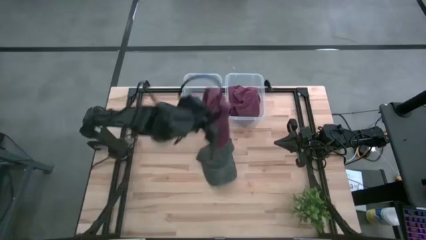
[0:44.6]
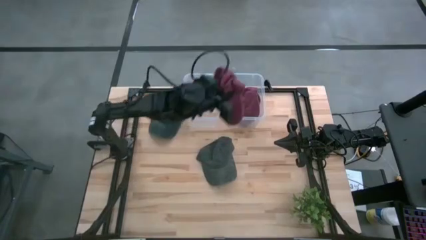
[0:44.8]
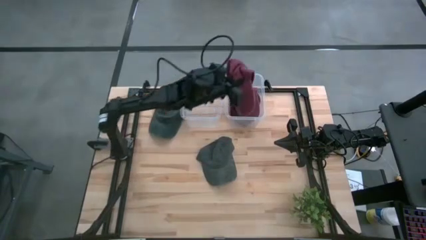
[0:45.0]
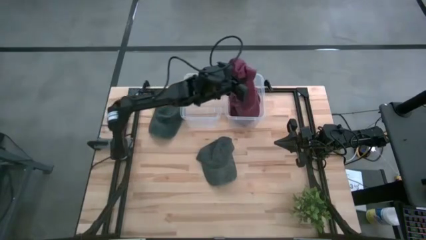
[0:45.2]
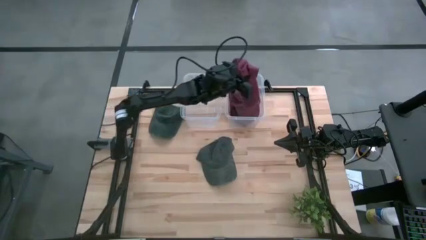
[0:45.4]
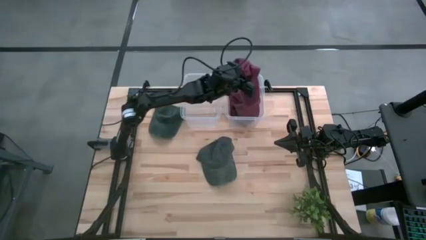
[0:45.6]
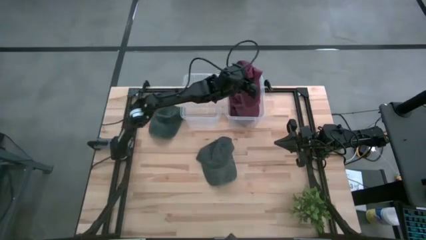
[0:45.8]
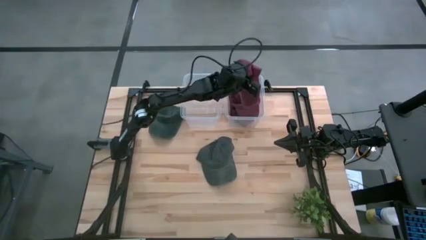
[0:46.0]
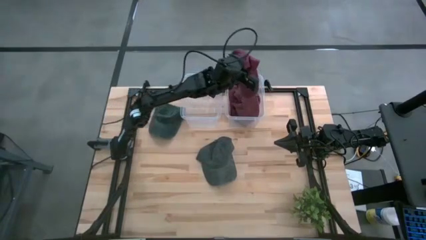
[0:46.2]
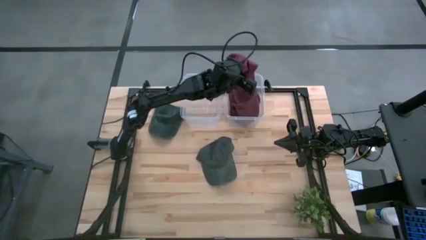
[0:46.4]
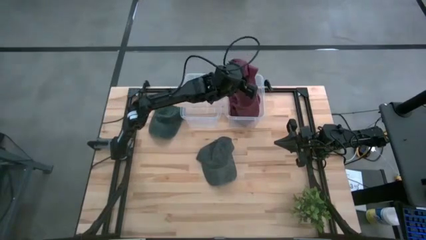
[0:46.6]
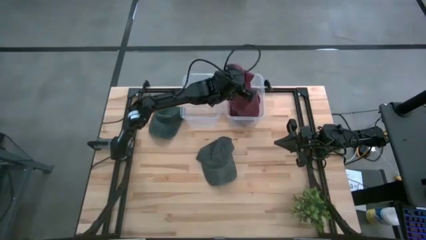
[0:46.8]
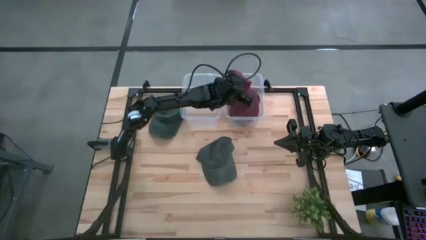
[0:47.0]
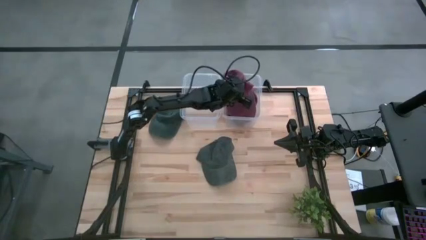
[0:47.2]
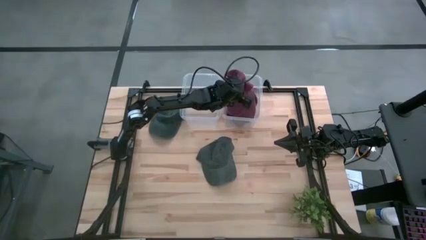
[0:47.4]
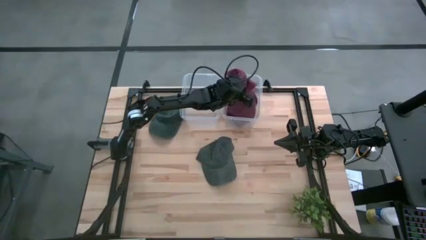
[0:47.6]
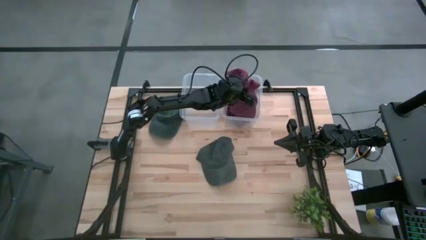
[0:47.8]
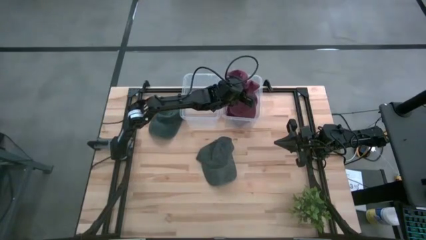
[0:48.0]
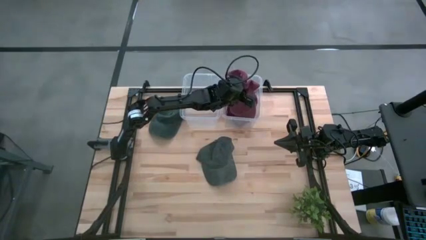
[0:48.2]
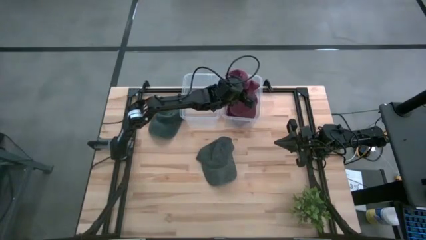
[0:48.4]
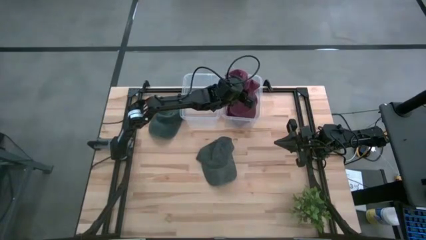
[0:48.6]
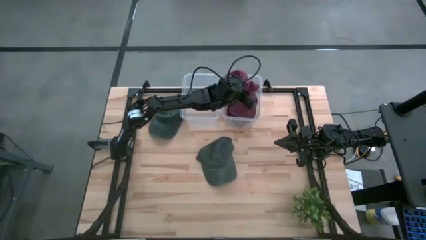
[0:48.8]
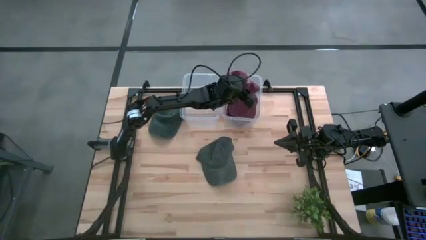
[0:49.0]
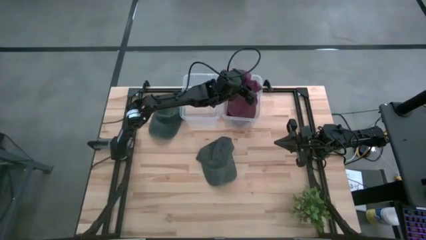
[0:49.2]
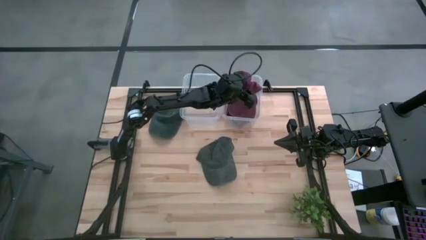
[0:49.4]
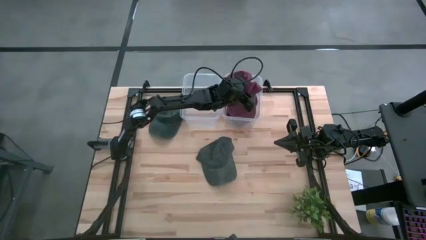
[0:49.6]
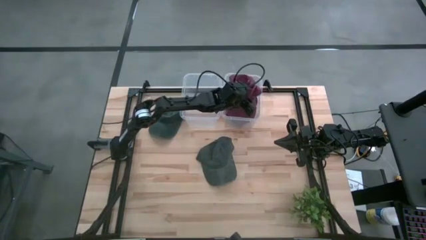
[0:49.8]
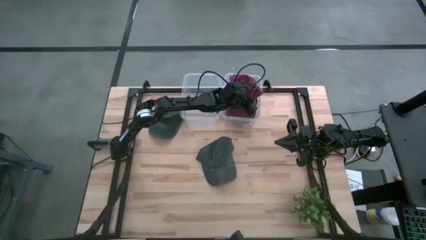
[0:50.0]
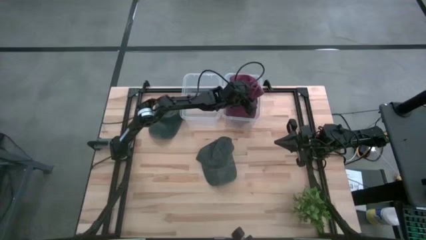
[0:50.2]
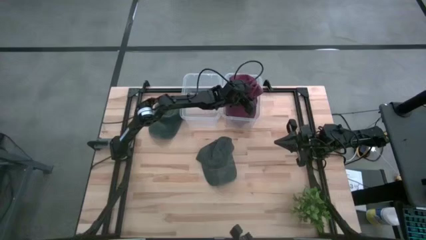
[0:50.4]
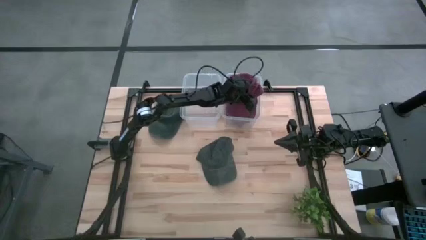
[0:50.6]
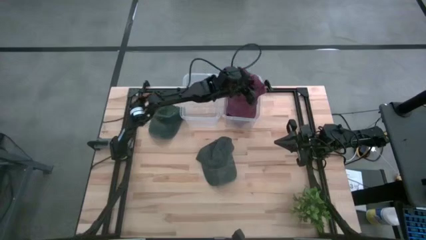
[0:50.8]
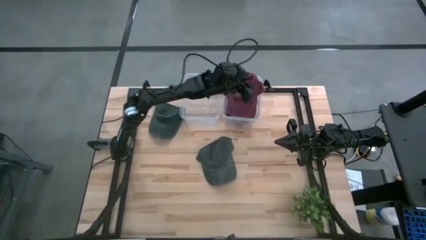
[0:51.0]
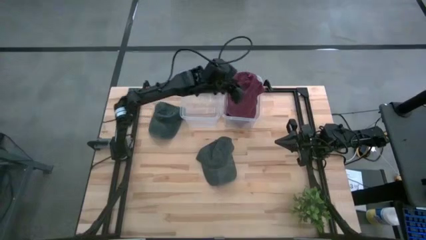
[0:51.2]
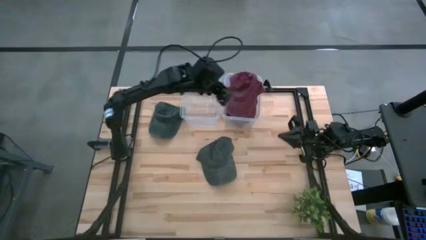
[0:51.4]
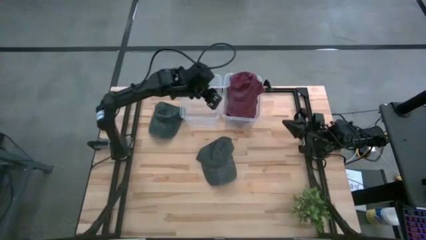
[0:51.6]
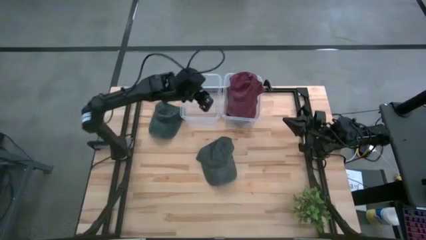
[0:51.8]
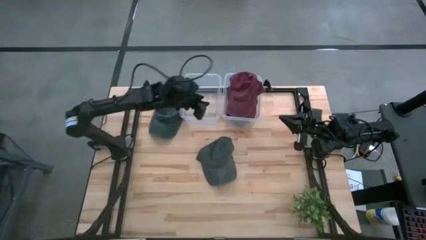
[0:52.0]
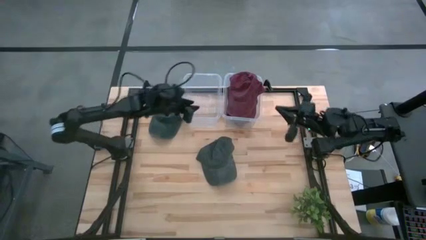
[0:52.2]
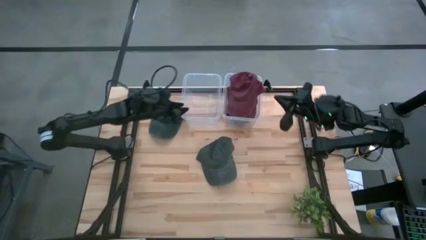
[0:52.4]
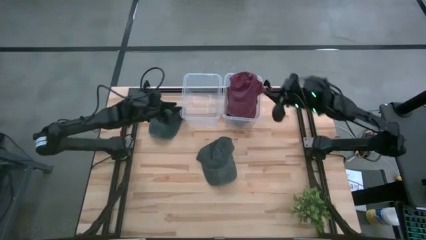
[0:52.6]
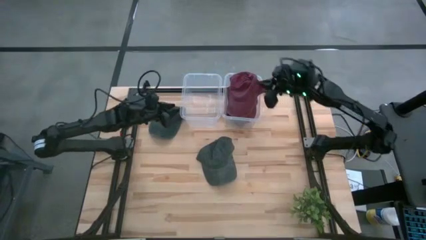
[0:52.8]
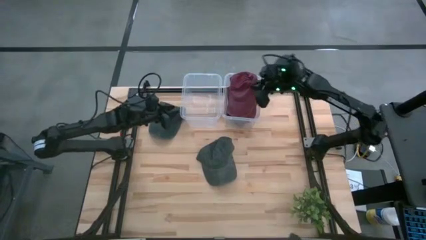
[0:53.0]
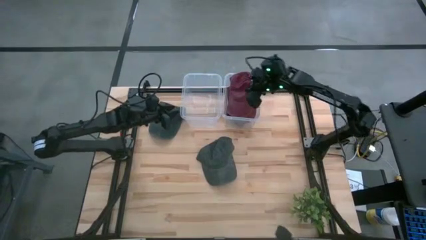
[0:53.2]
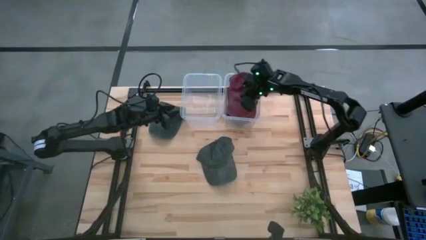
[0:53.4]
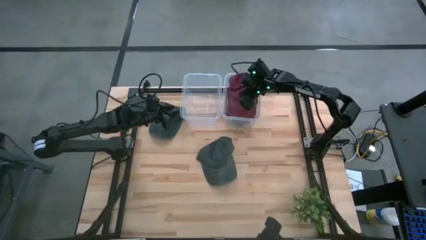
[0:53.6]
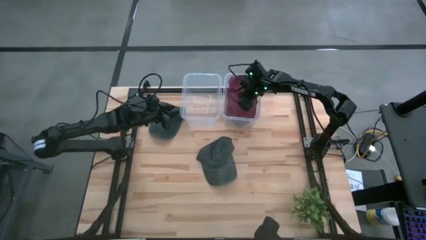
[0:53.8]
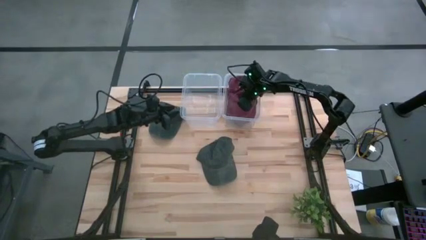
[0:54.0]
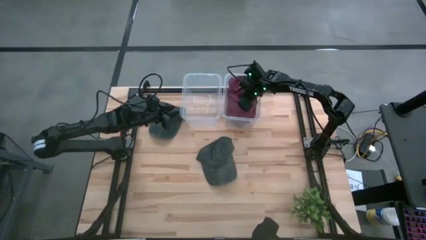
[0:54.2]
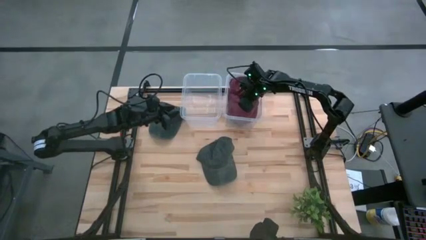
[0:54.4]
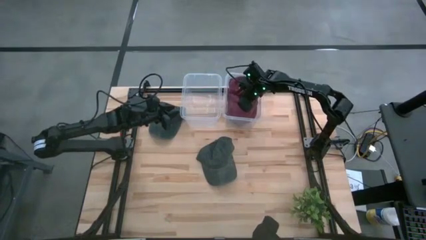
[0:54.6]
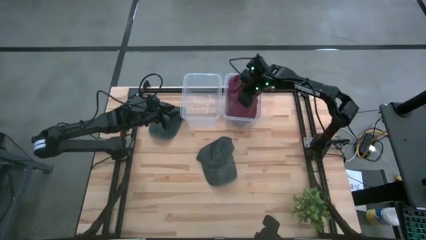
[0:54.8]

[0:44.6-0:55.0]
Task: Pick & Place hat
Put the red cap into the right transparent bin
